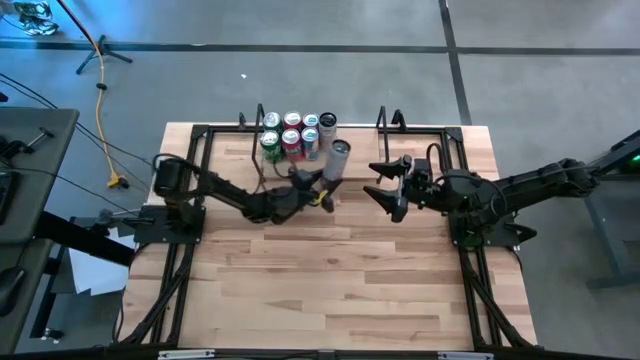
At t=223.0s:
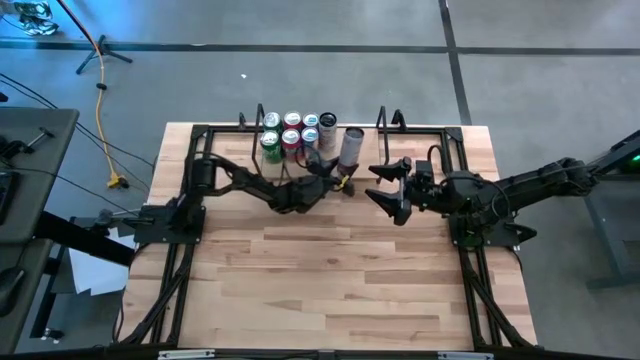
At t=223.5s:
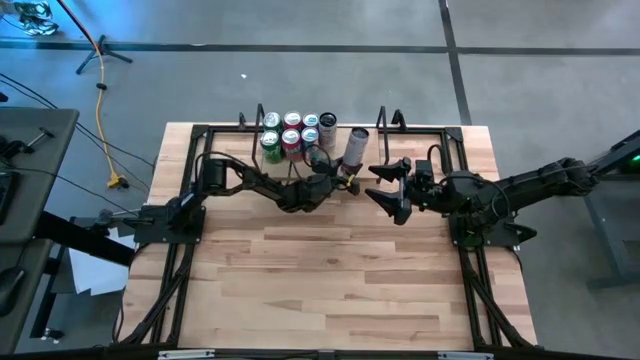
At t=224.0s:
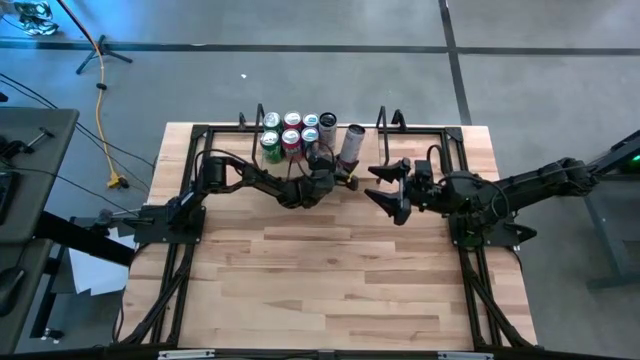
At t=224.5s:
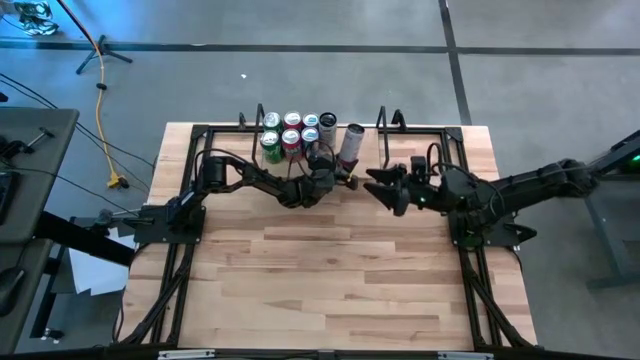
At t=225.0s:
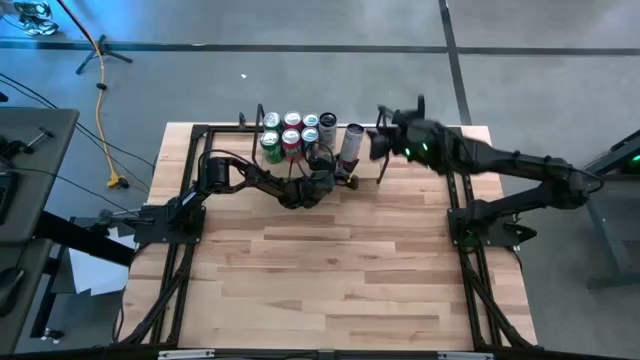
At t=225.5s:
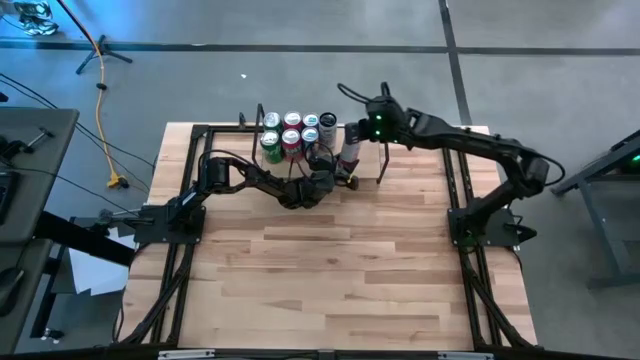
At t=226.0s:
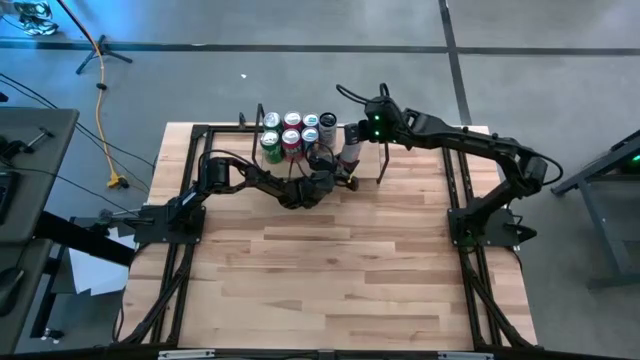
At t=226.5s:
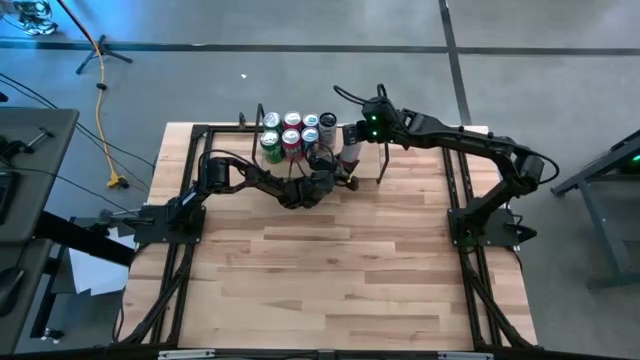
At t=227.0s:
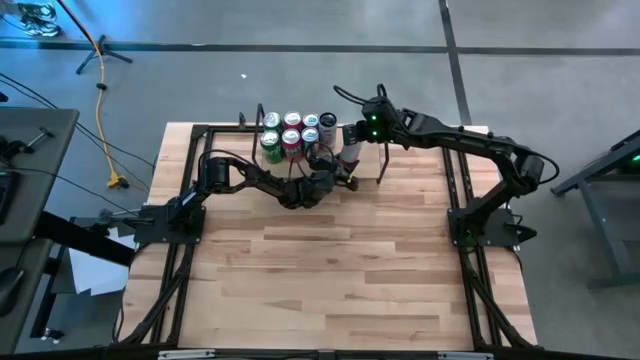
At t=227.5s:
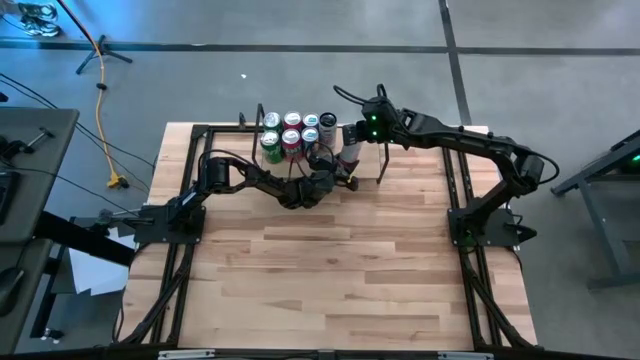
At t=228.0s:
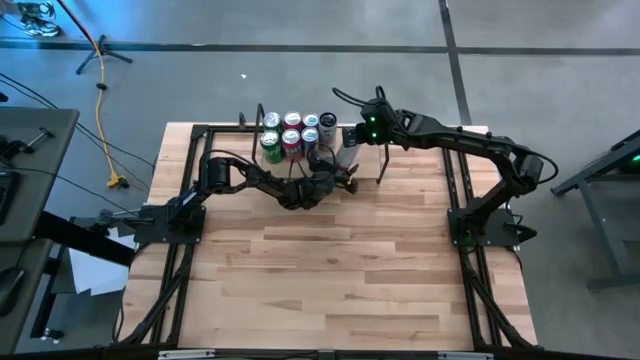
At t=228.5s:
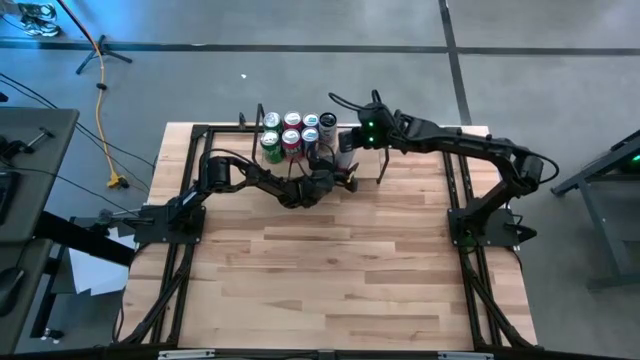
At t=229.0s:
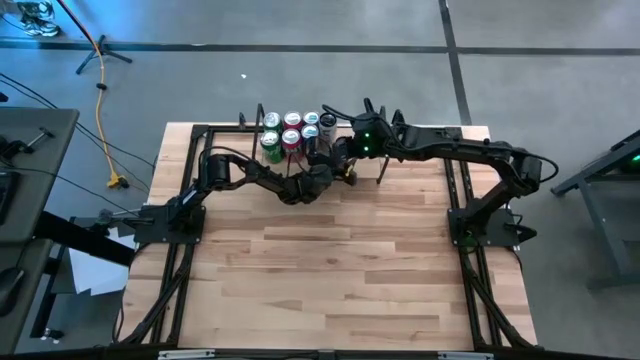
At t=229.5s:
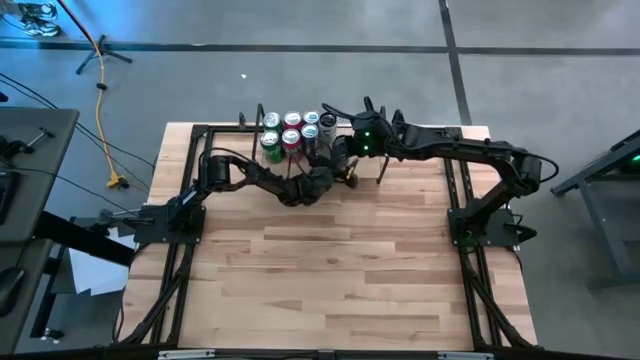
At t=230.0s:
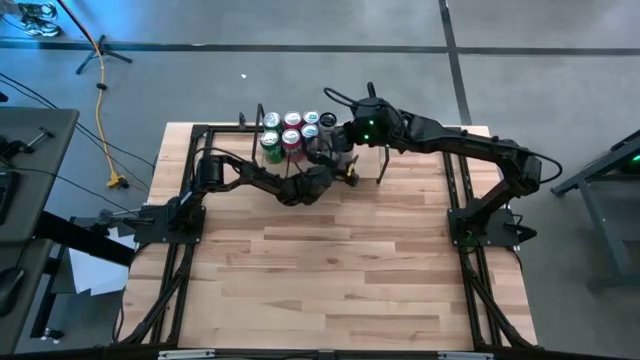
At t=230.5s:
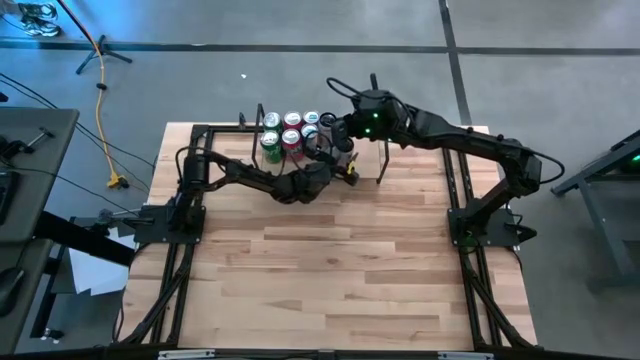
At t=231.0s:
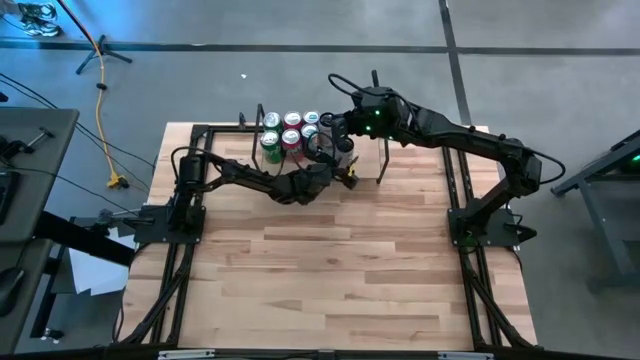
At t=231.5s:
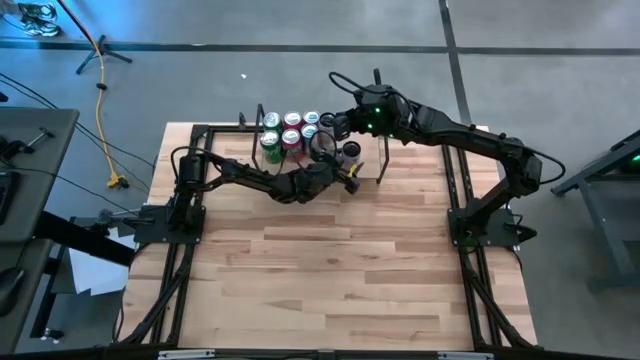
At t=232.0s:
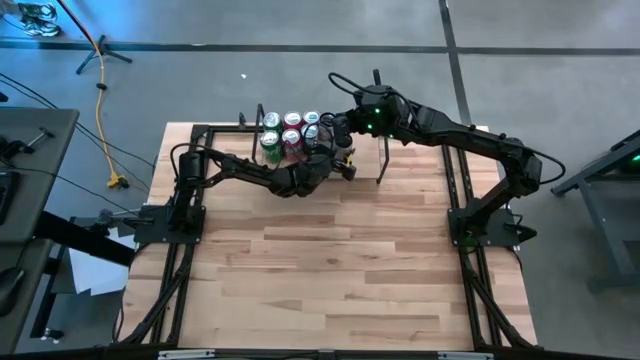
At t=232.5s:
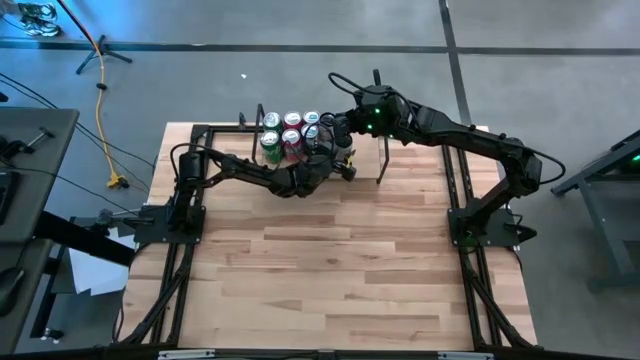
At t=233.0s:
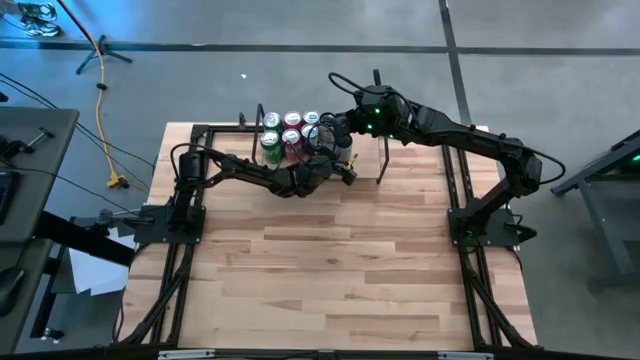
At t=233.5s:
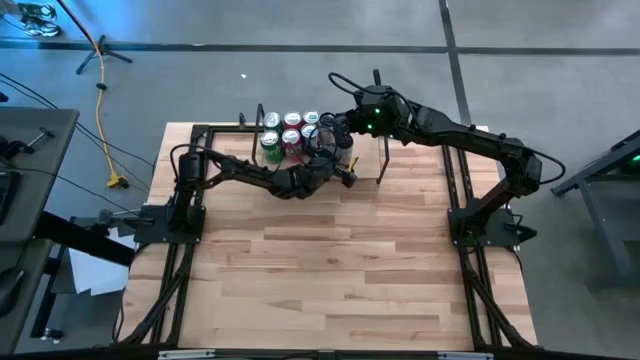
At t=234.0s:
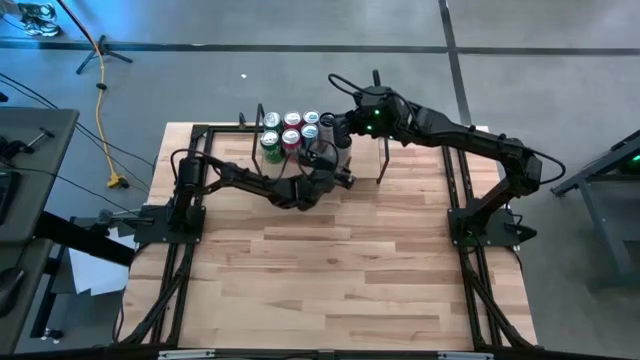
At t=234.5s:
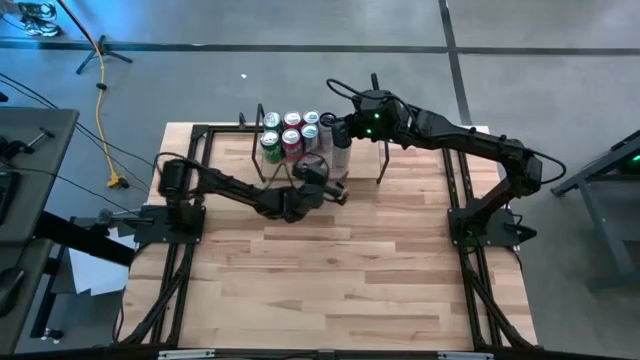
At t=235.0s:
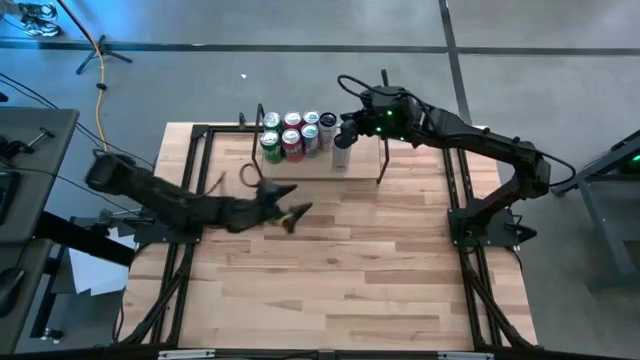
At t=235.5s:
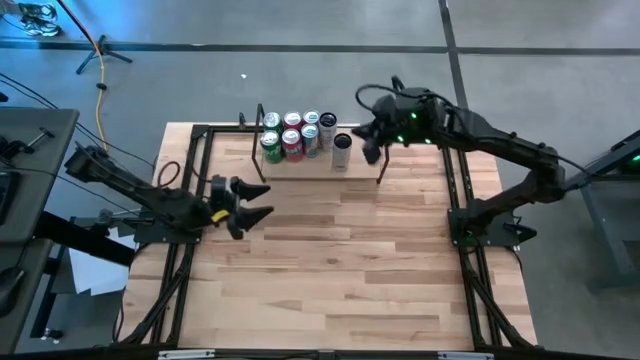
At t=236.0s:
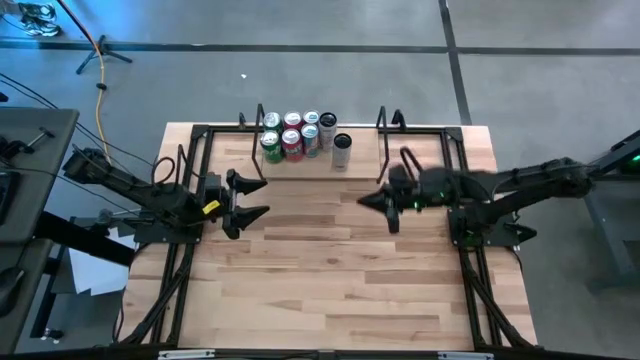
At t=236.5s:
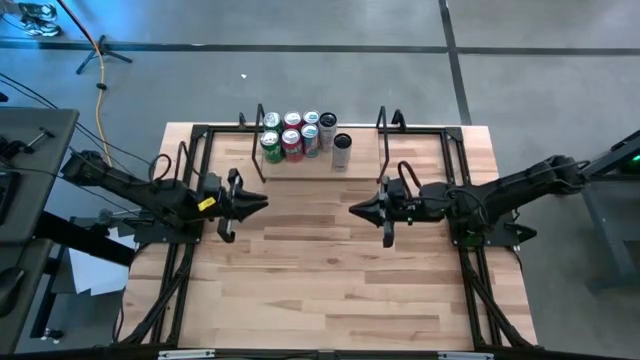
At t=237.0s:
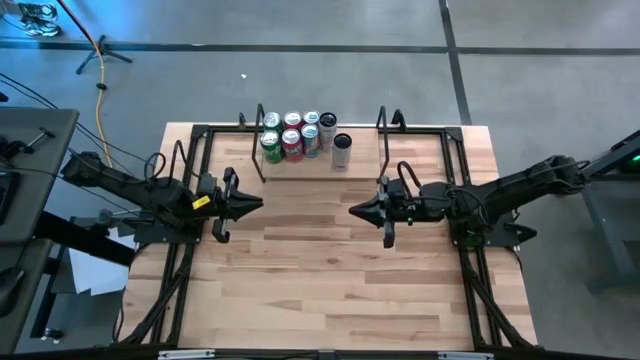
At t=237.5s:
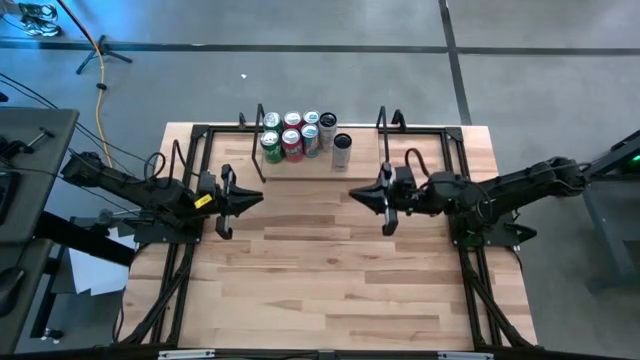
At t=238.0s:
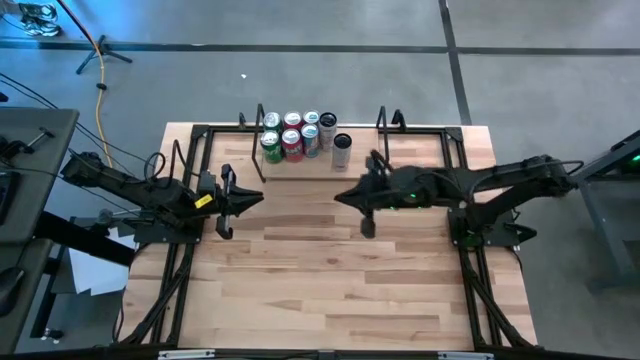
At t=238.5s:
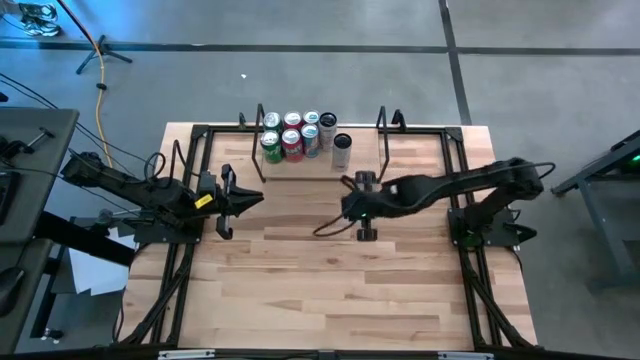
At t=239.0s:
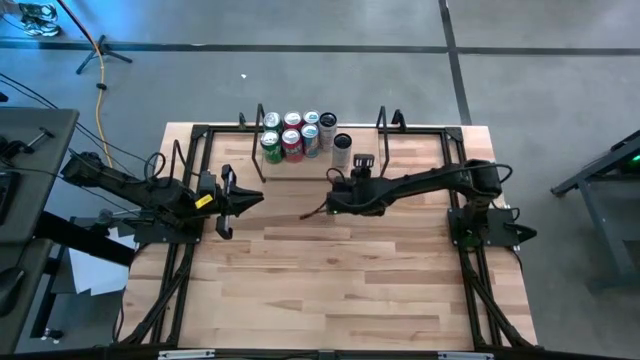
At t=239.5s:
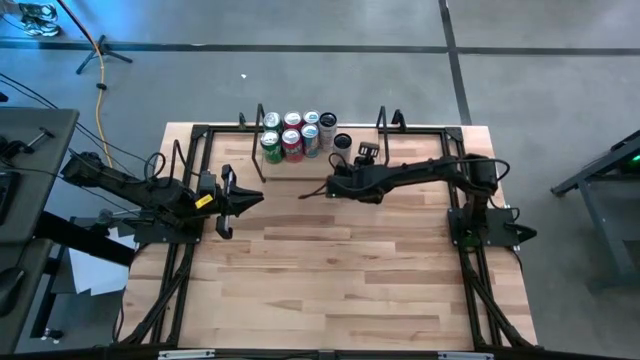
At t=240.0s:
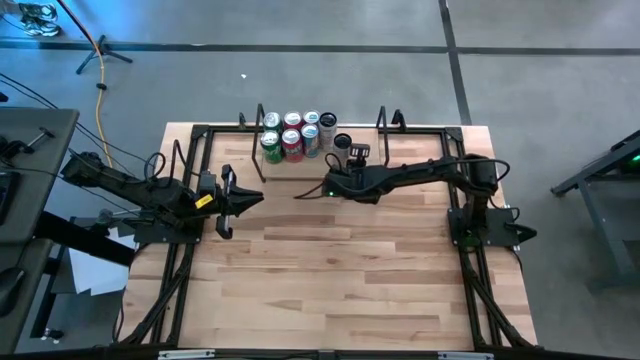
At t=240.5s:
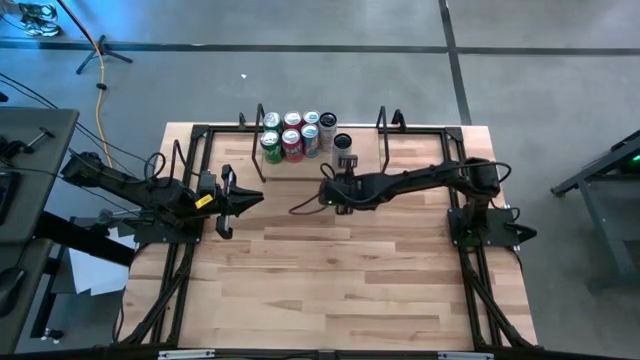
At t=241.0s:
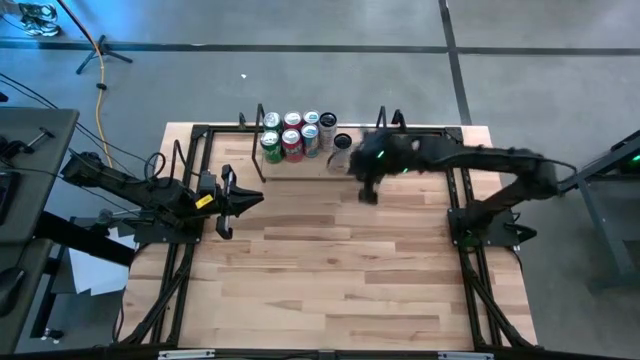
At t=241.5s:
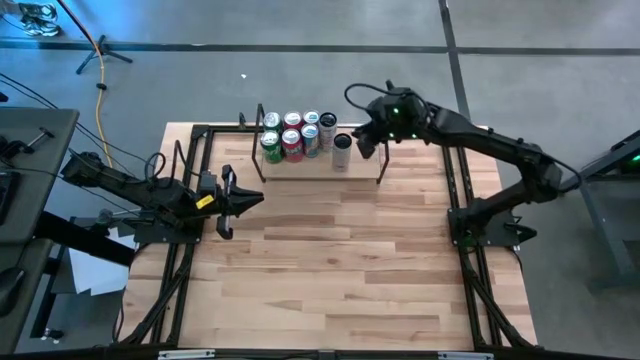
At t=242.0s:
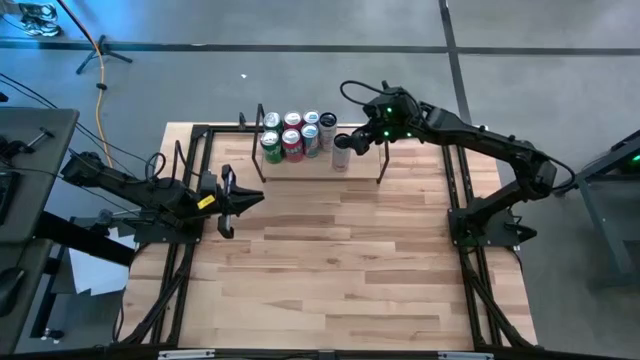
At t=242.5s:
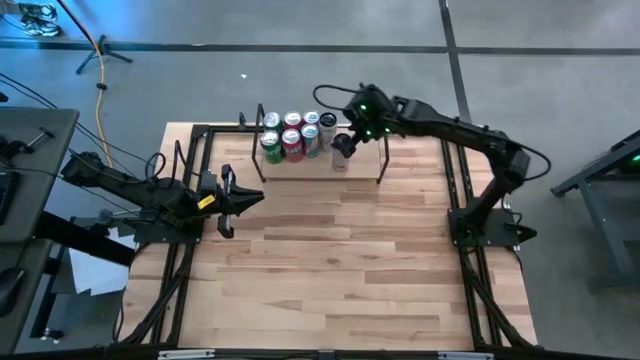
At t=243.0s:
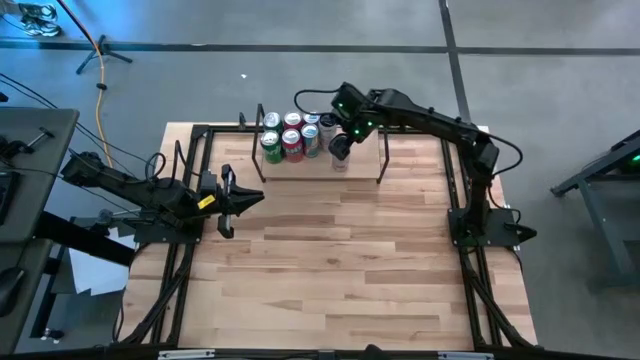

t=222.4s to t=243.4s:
Task: Place canned beverage on shelf
Put the white pink soda can on the shelf aligned with the white pink soda can
